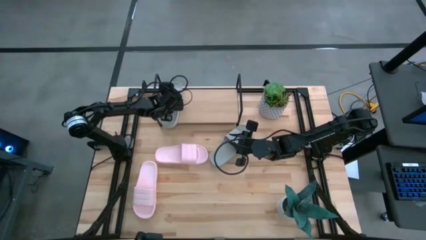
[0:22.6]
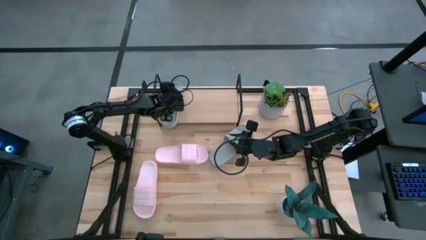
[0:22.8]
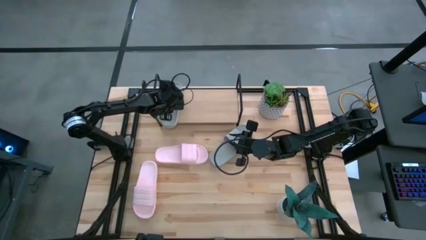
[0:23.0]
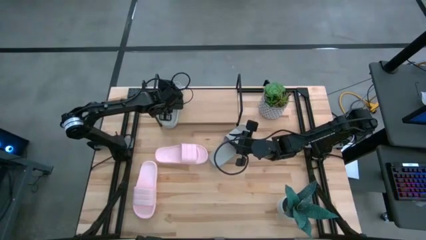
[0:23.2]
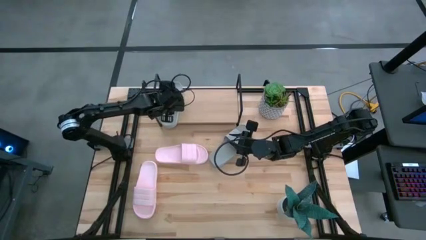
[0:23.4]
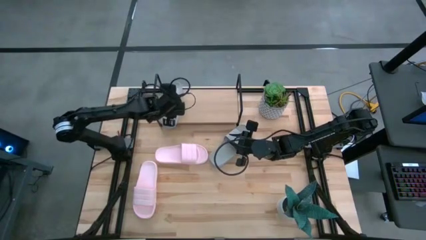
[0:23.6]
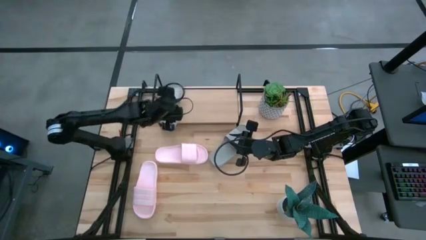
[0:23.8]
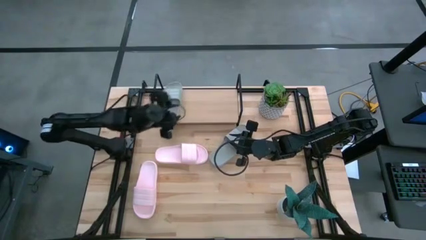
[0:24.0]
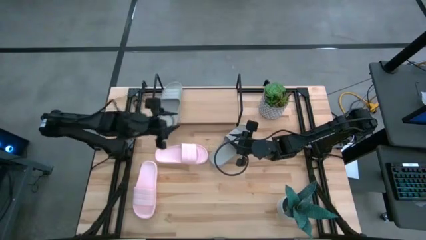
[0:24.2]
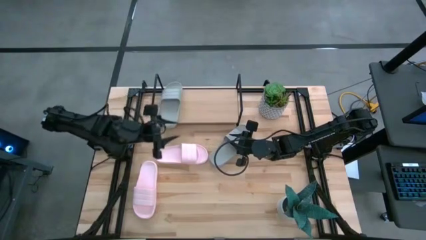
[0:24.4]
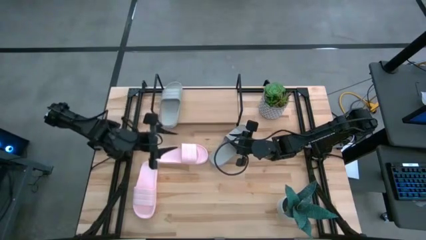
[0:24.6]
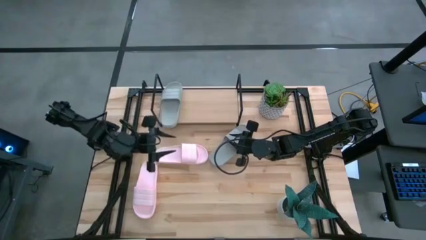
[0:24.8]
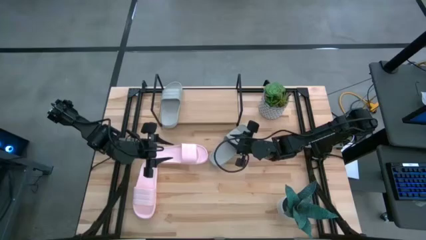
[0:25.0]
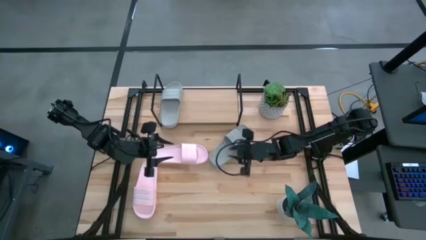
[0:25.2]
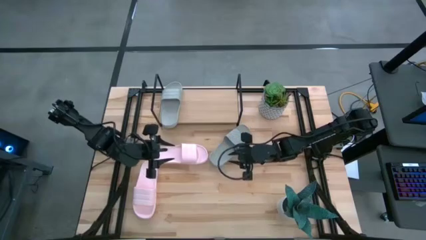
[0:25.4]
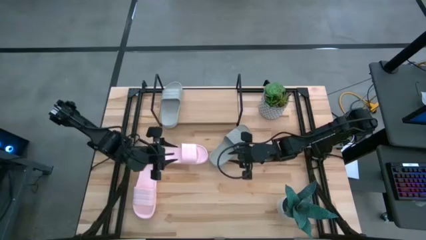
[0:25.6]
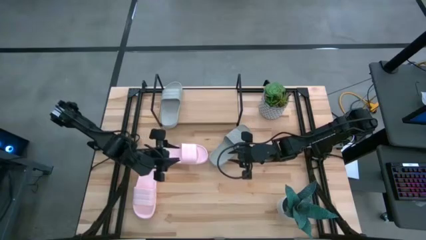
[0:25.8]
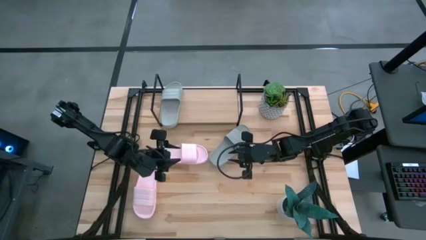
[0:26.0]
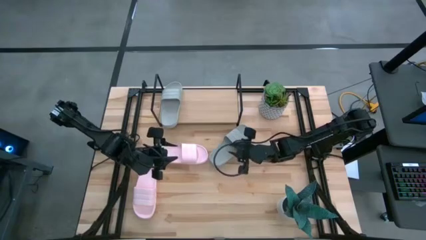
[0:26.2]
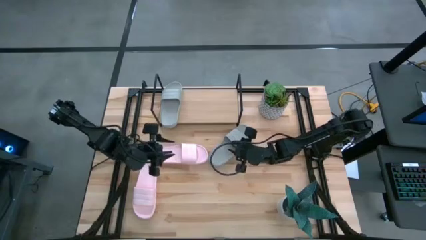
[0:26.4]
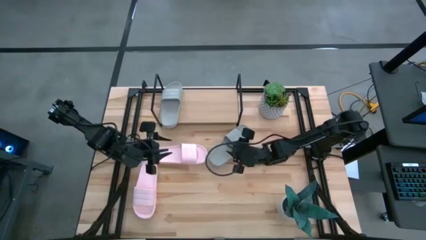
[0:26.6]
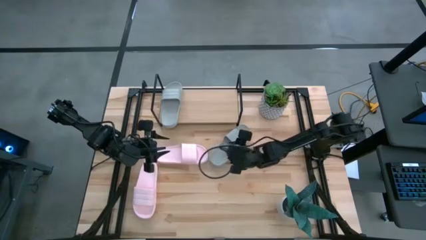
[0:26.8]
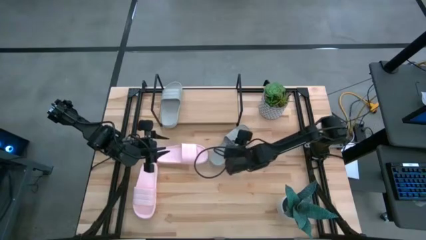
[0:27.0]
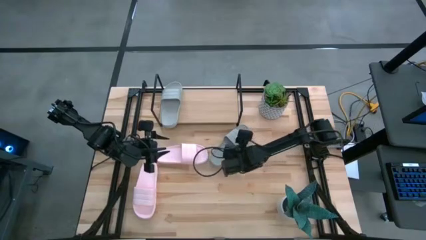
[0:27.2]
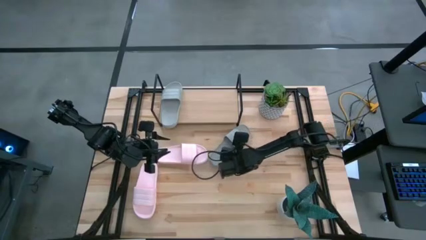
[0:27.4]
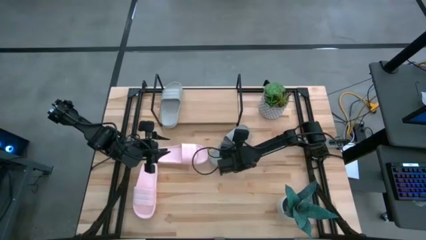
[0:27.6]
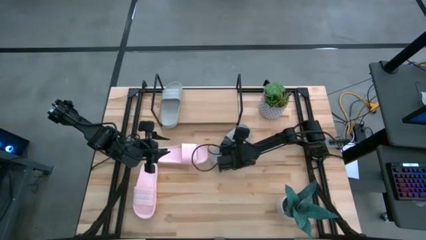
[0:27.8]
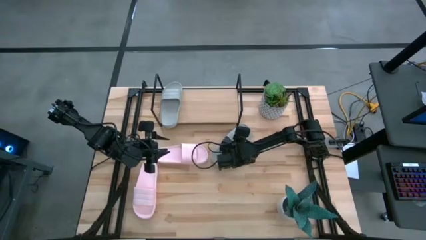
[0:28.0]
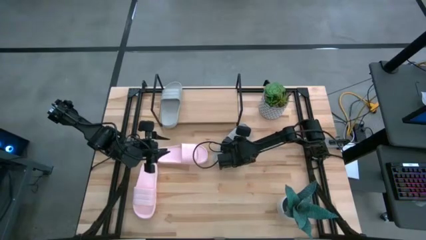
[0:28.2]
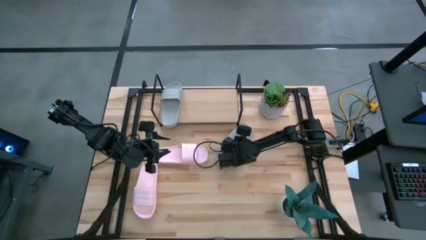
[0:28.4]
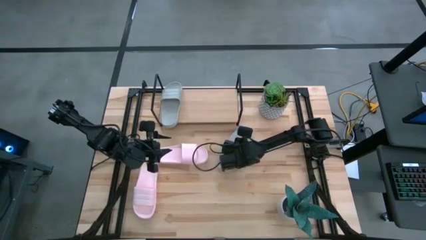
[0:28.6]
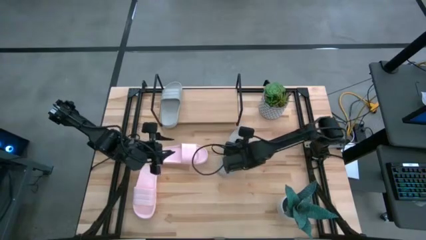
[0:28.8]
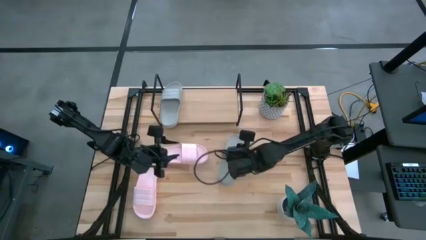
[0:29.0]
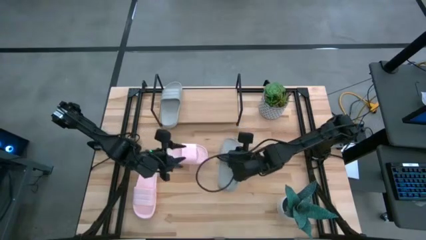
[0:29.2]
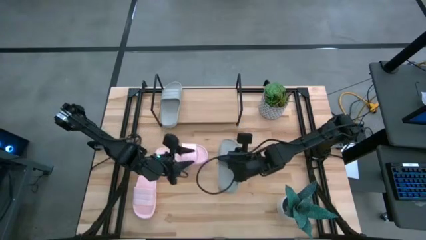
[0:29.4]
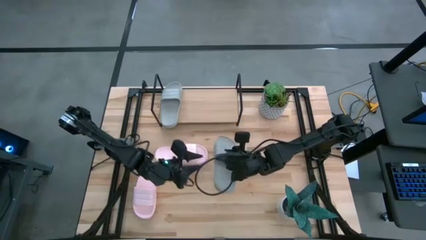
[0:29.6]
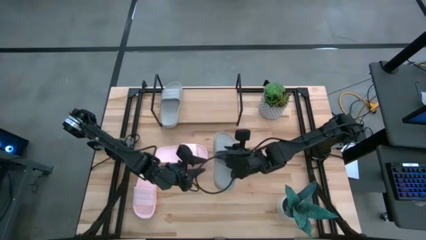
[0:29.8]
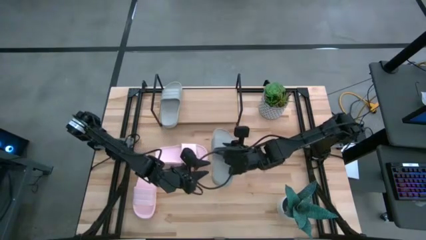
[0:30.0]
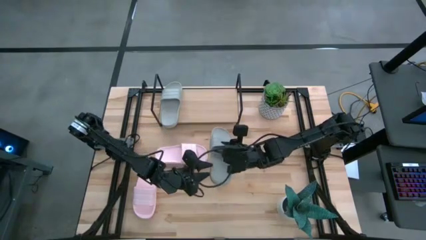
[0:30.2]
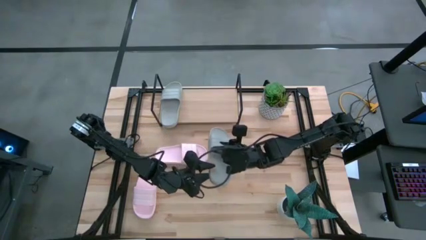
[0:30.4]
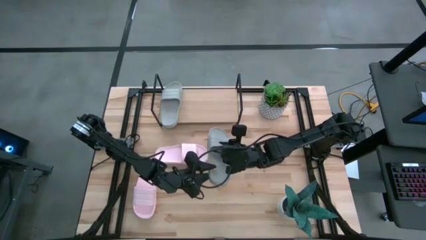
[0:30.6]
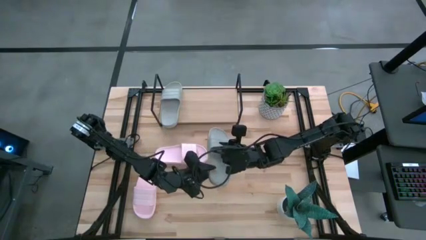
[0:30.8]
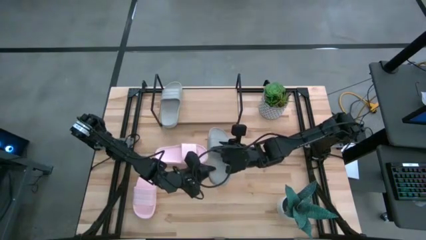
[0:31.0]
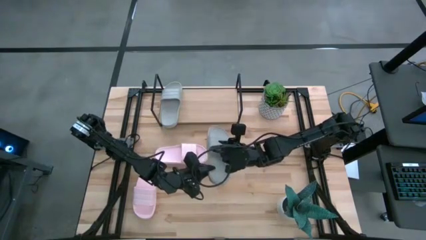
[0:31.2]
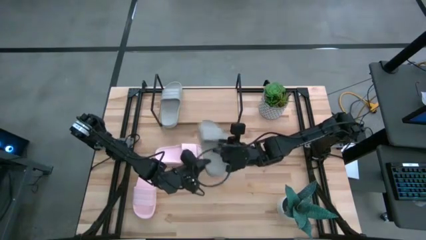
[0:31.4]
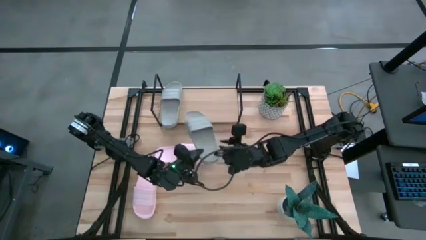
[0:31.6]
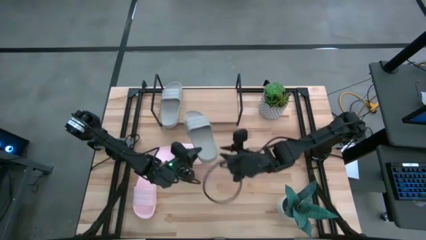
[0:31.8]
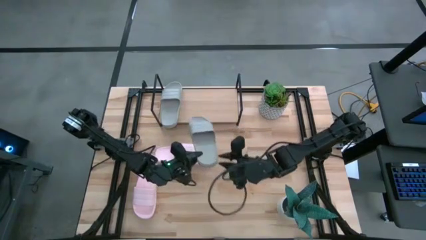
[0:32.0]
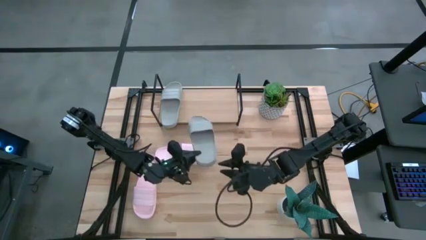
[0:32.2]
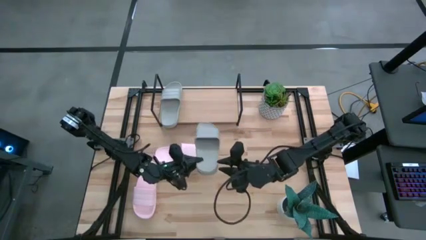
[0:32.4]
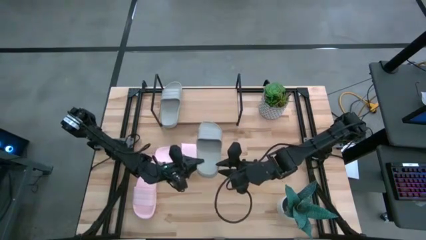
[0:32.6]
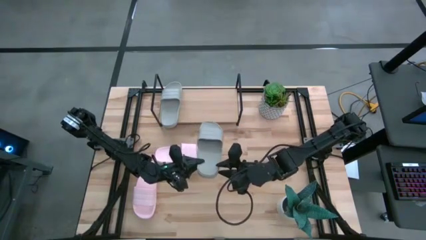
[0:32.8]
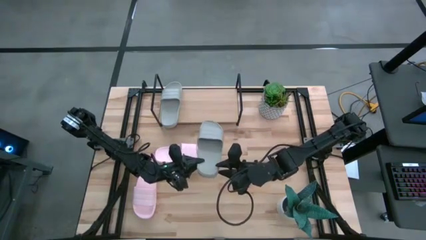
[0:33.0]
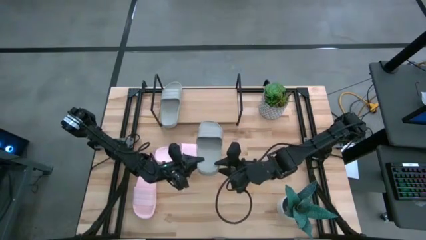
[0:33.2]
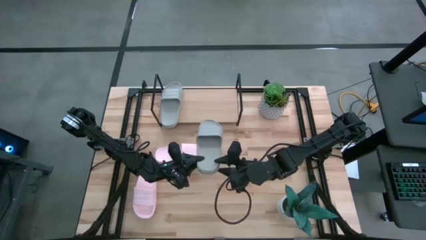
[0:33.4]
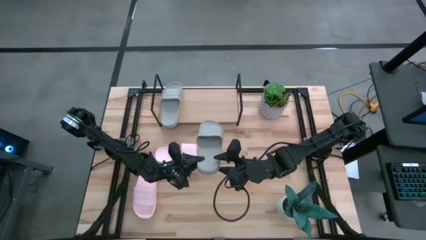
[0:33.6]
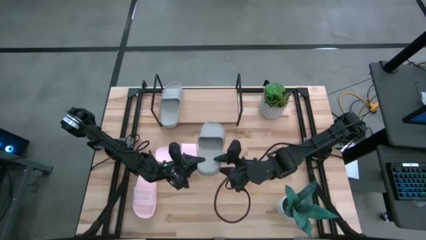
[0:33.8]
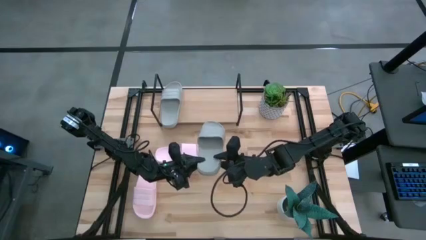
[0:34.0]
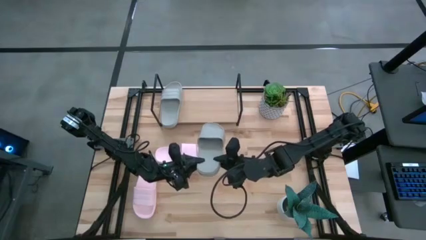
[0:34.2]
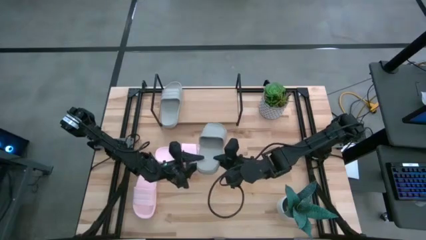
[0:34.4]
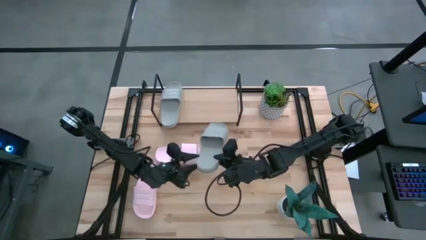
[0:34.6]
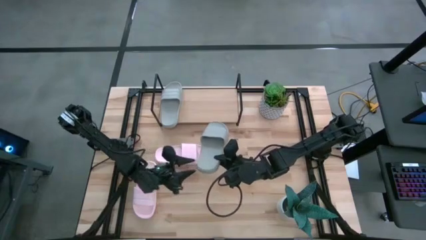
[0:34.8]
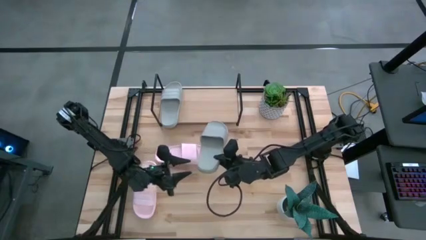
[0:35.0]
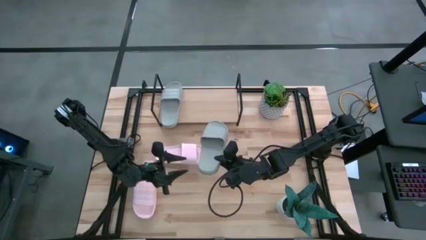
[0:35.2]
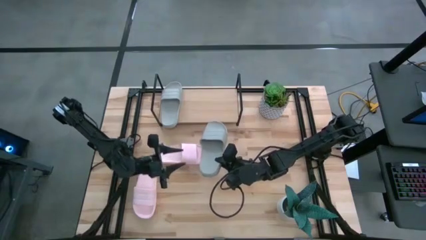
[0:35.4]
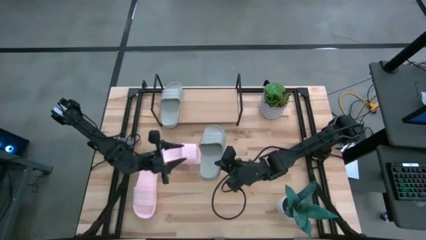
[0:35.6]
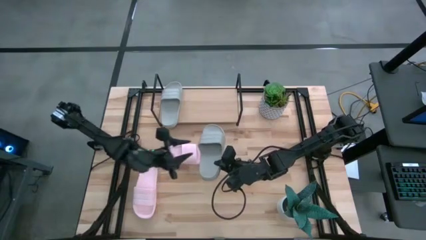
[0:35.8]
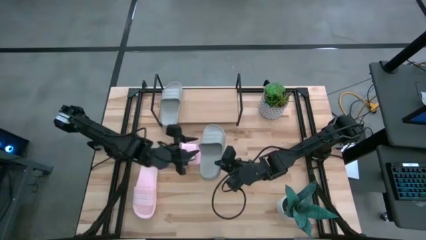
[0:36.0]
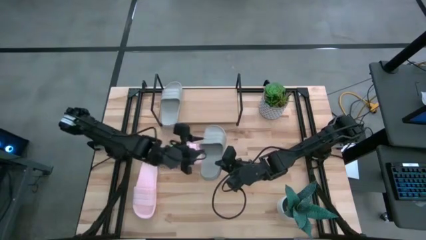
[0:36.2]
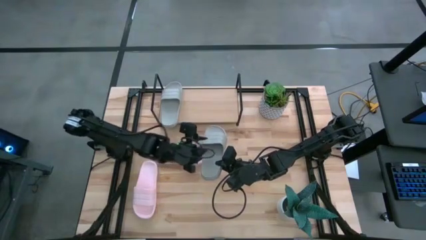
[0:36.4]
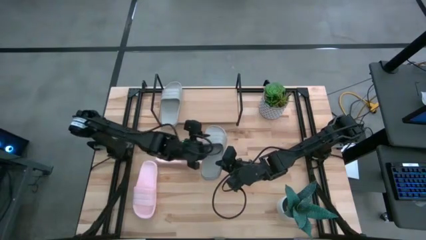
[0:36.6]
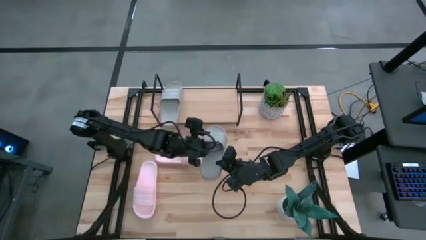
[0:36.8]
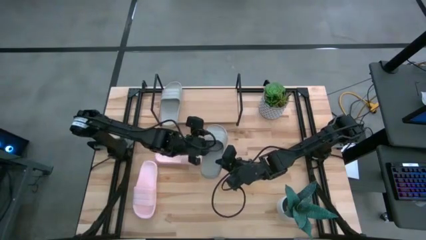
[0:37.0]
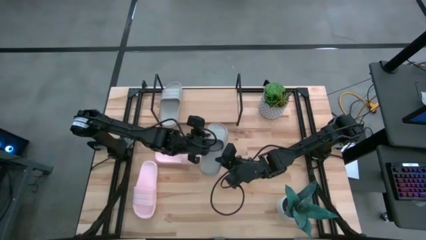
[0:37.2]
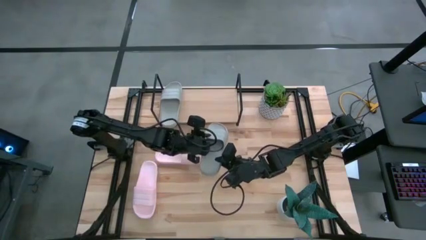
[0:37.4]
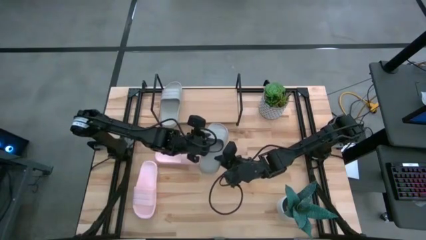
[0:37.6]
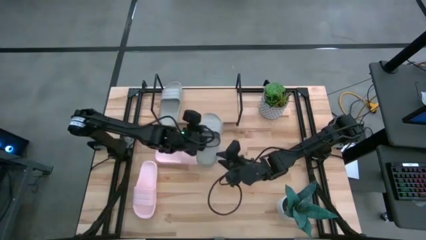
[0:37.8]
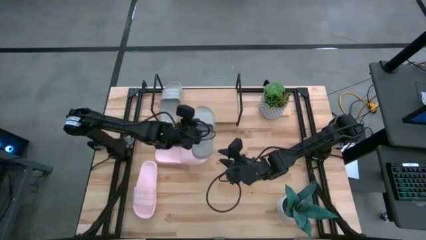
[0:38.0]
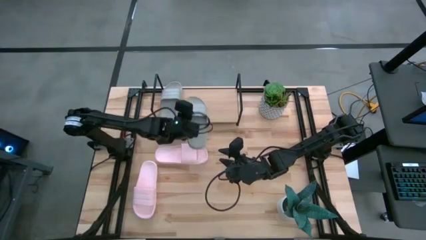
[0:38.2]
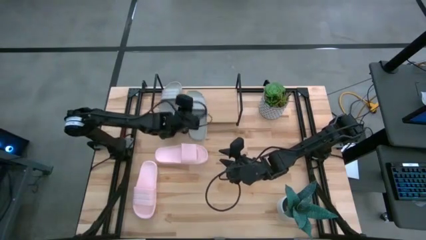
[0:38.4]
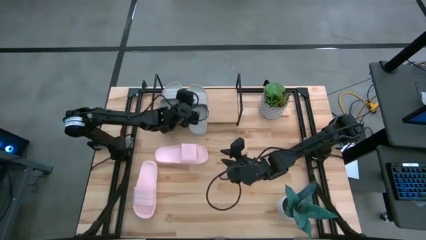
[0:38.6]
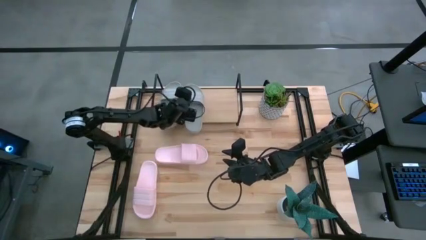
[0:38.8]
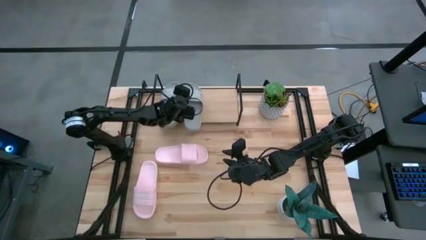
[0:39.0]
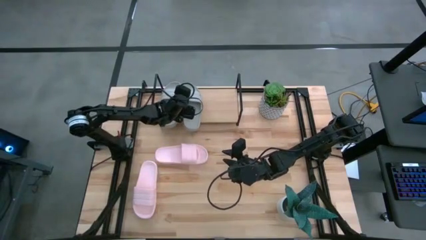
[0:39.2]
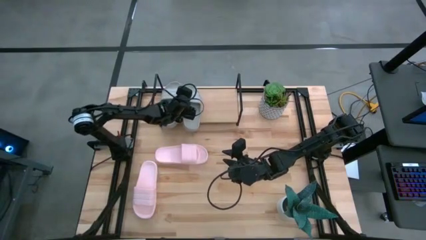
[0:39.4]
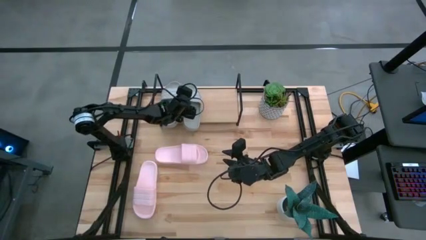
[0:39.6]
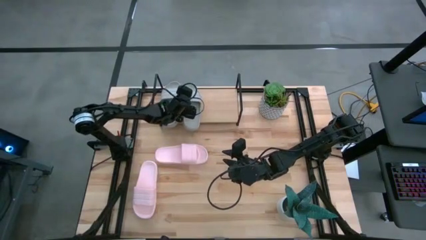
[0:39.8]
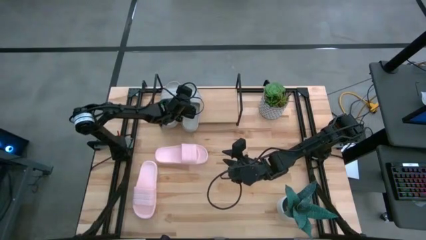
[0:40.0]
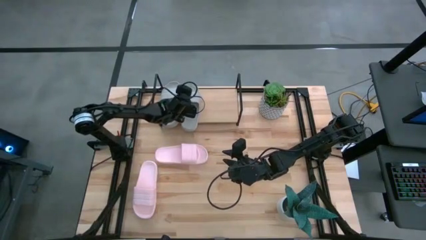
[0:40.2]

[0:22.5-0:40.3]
Task: Pick and place slides into the shelf
Put the gray slipper on the shelf
